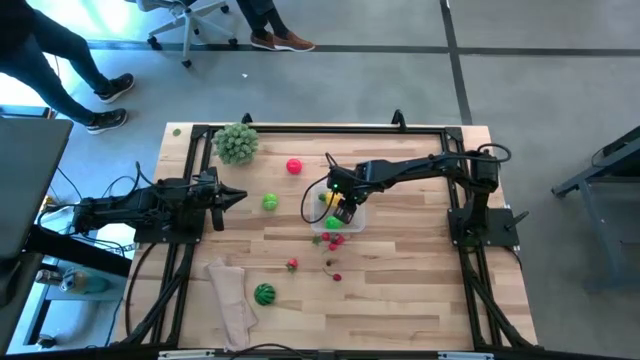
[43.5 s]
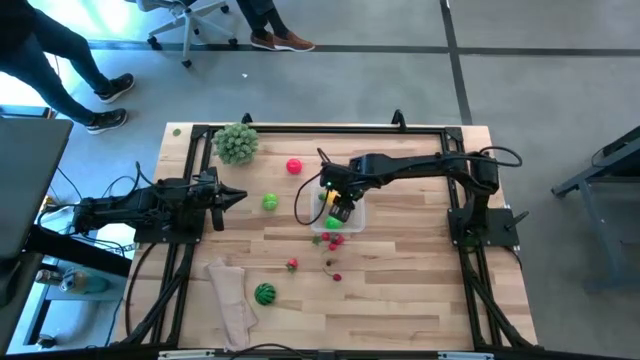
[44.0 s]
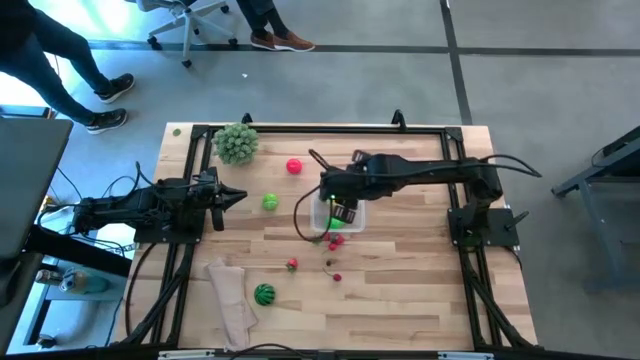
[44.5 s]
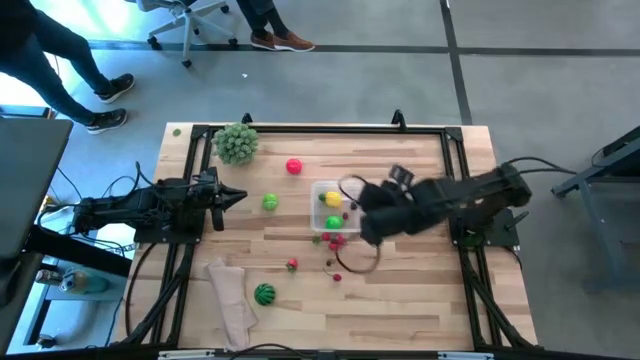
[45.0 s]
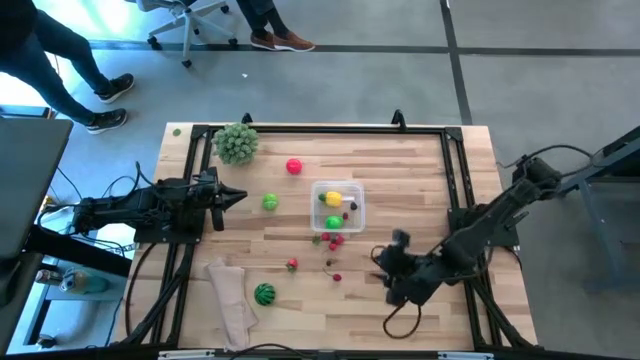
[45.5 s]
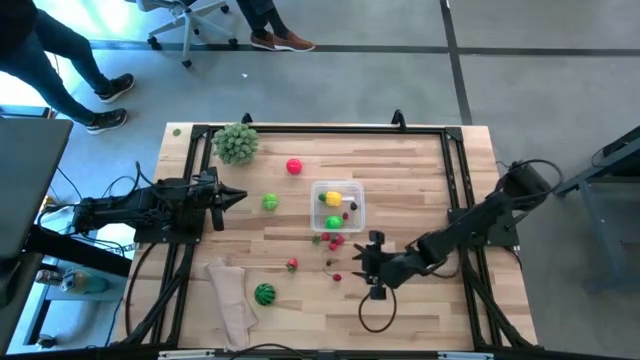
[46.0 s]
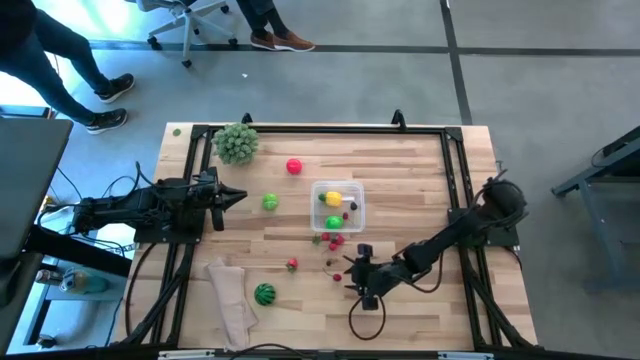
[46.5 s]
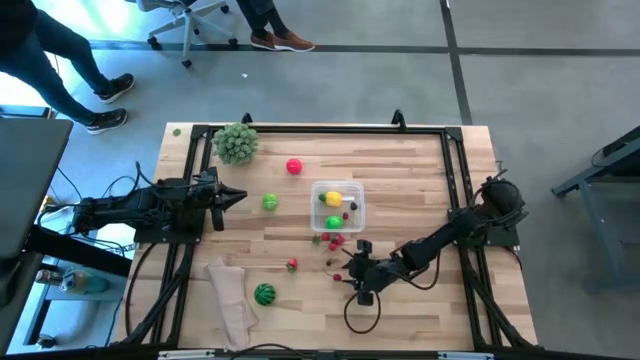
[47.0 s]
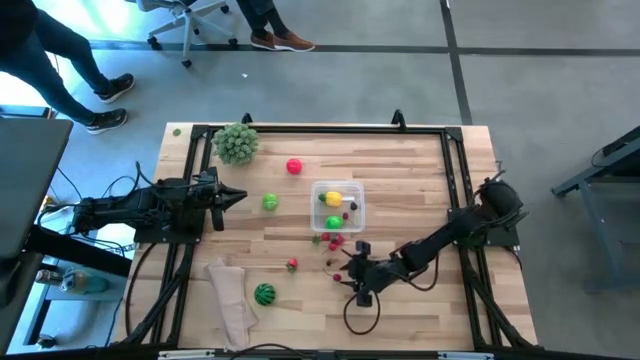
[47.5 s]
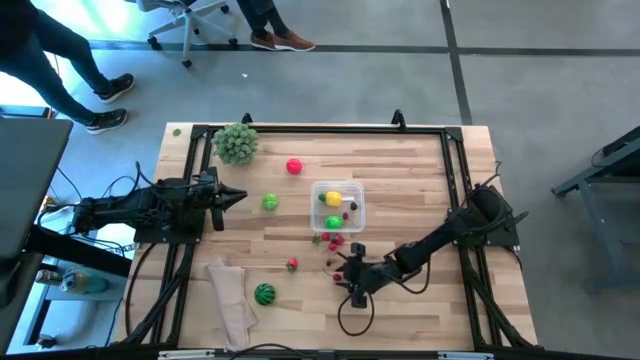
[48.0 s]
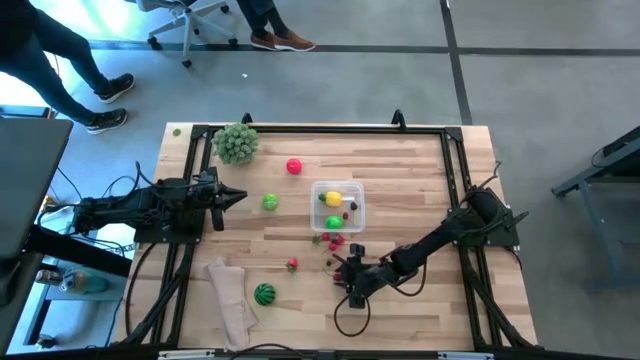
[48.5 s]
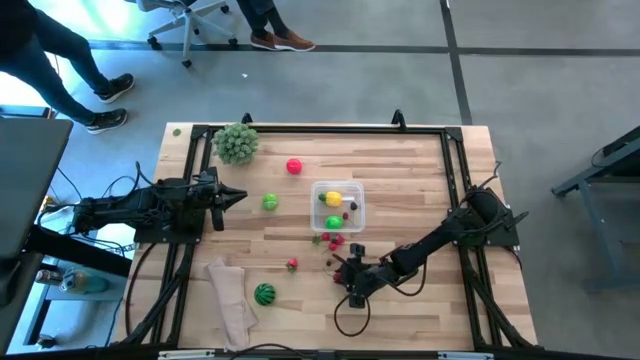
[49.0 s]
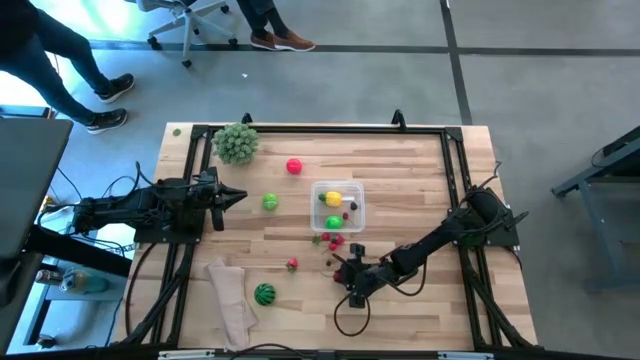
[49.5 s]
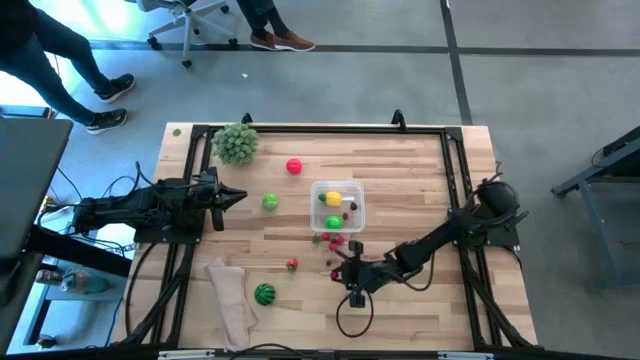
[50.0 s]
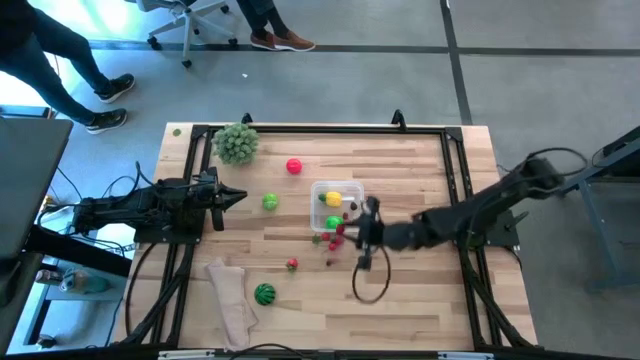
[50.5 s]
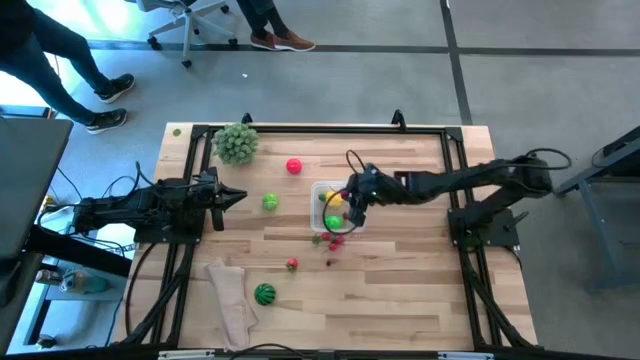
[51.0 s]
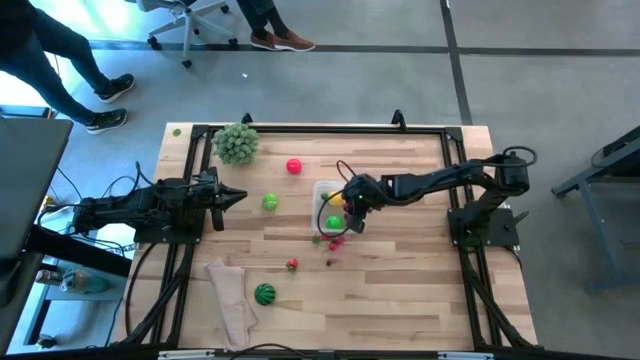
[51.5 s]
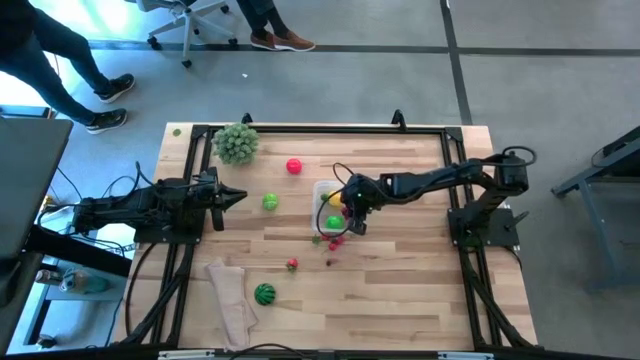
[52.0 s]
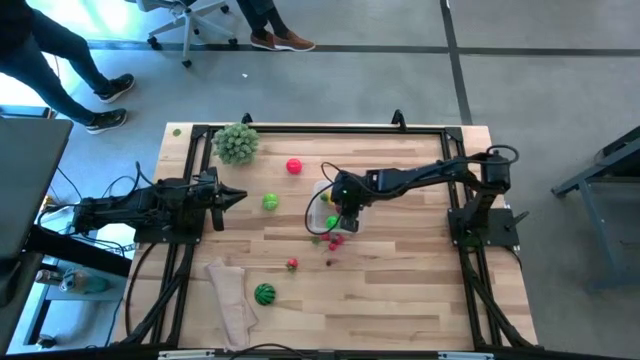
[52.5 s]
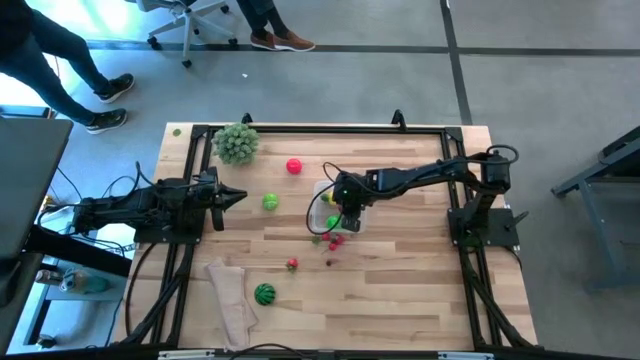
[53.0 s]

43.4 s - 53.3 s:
Task: Pick and placing Produce into tupperware
Put the red cherry into the transparent container

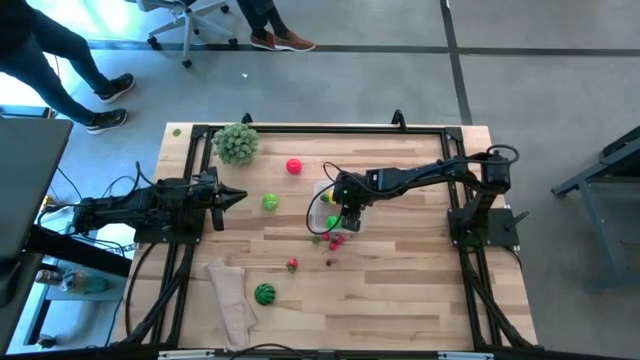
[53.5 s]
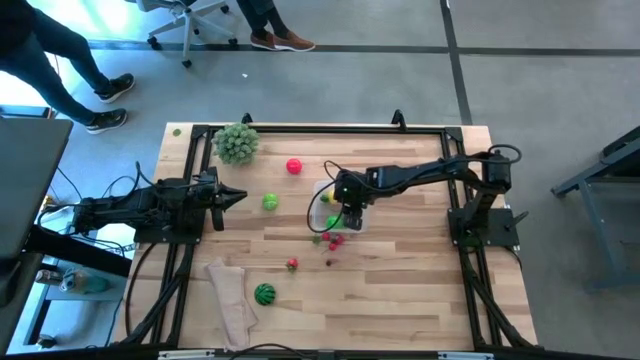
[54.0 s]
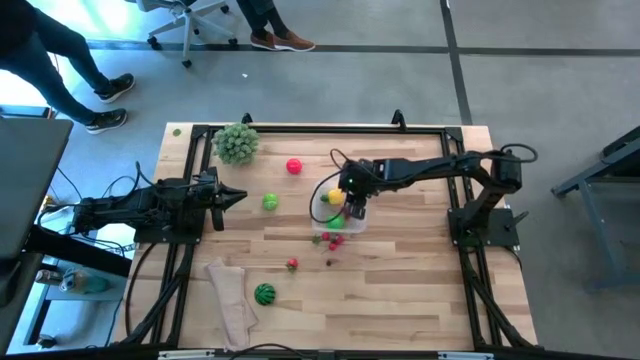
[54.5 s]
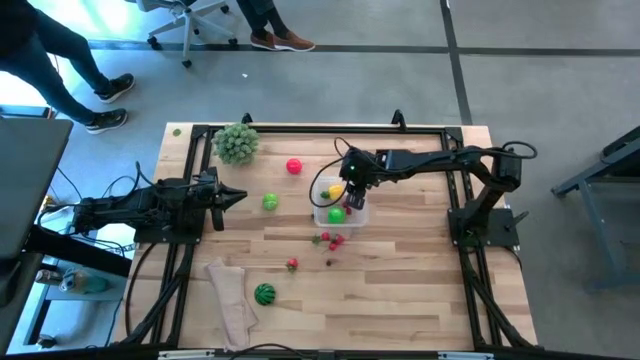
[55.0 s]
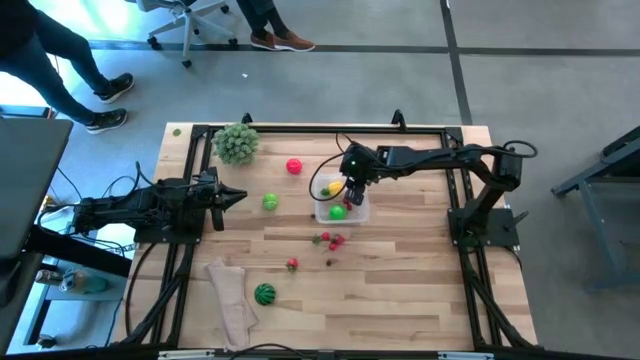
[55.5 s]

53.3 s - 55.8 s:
Adjust the transparent container

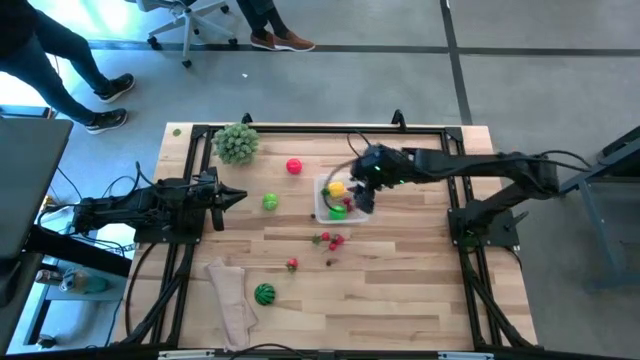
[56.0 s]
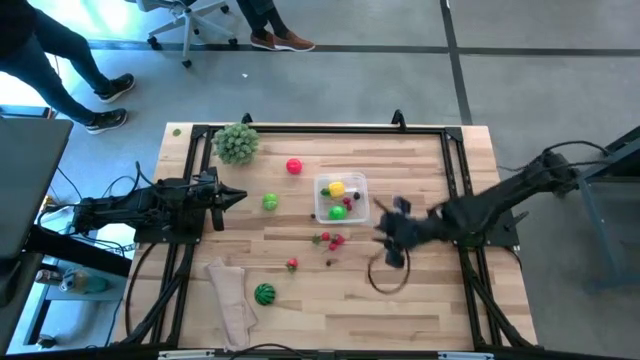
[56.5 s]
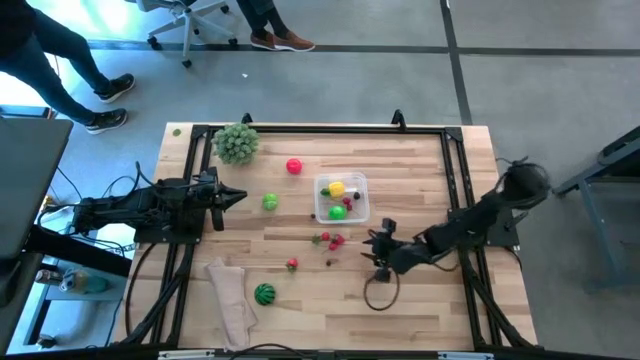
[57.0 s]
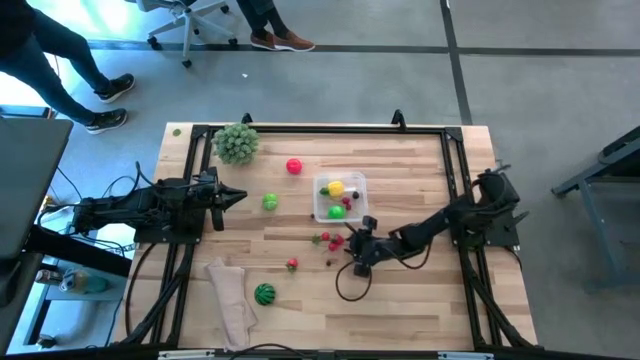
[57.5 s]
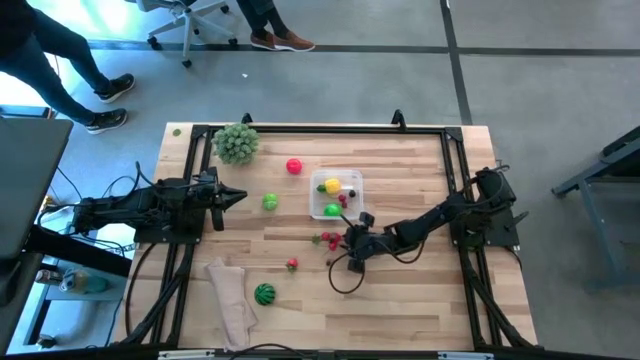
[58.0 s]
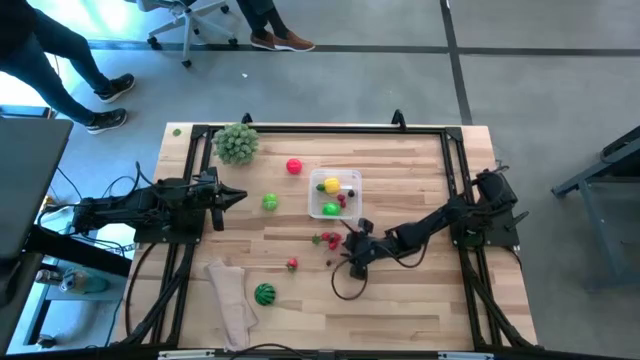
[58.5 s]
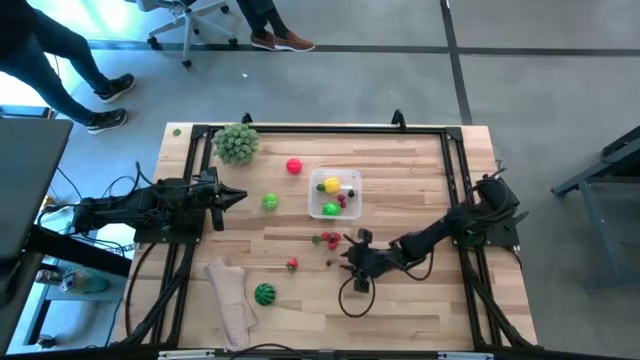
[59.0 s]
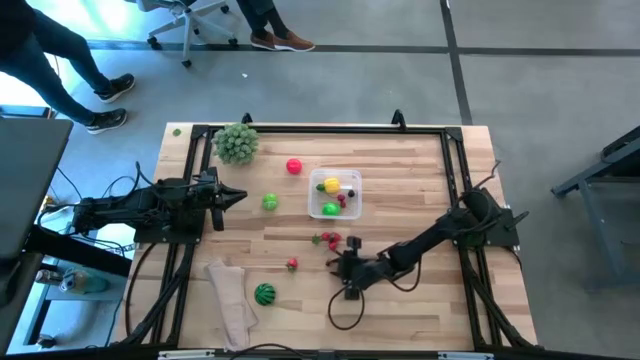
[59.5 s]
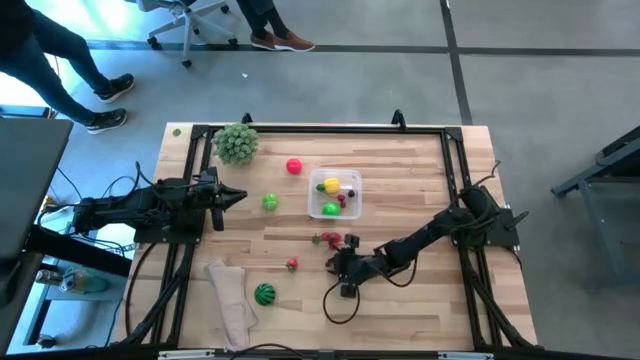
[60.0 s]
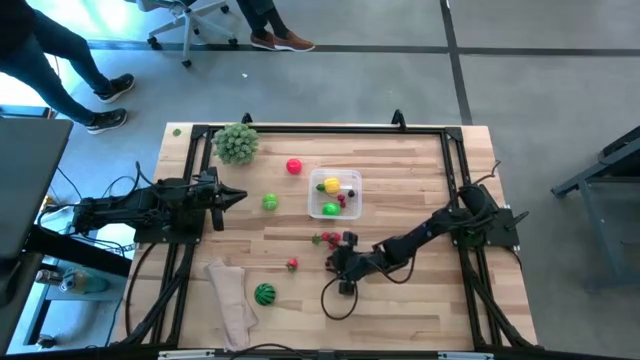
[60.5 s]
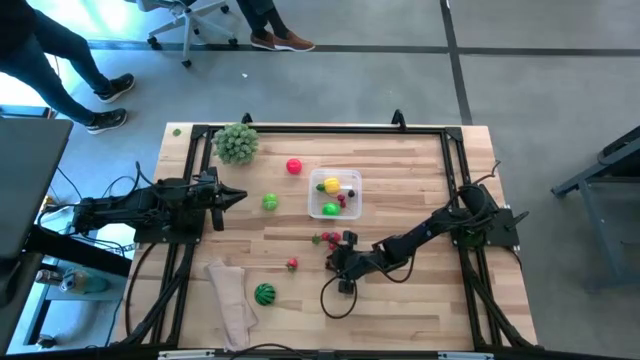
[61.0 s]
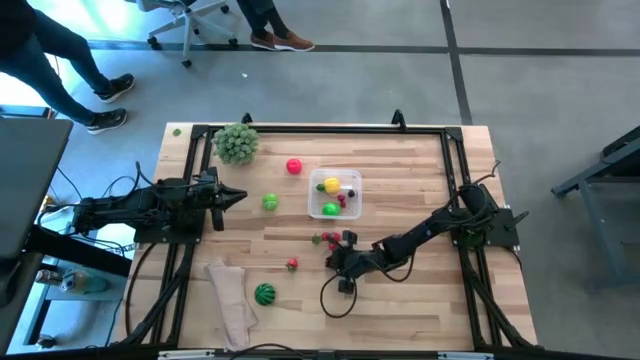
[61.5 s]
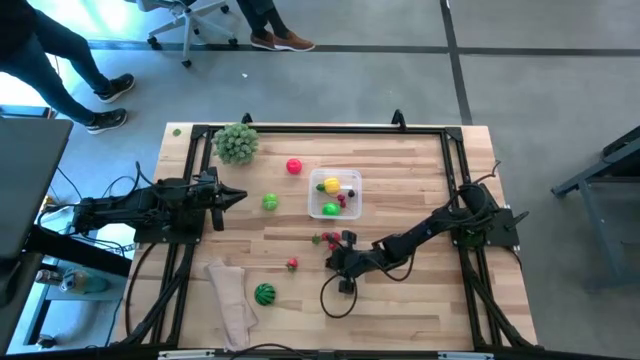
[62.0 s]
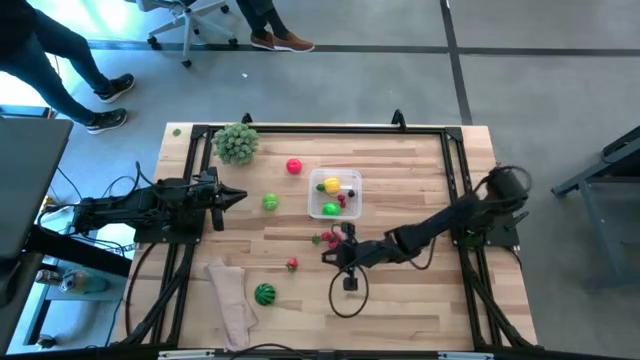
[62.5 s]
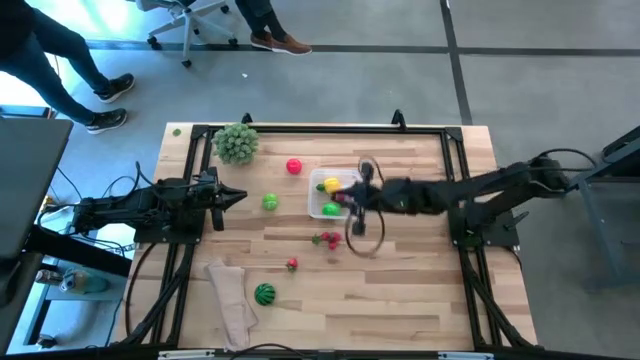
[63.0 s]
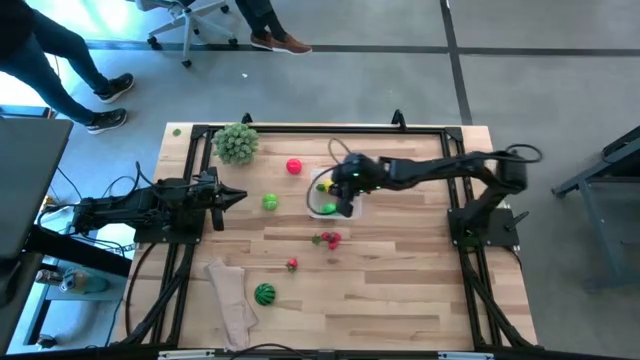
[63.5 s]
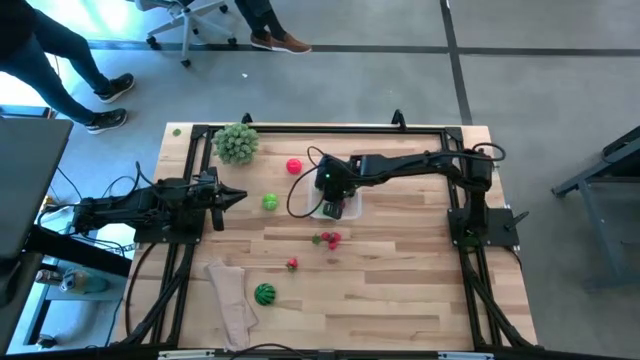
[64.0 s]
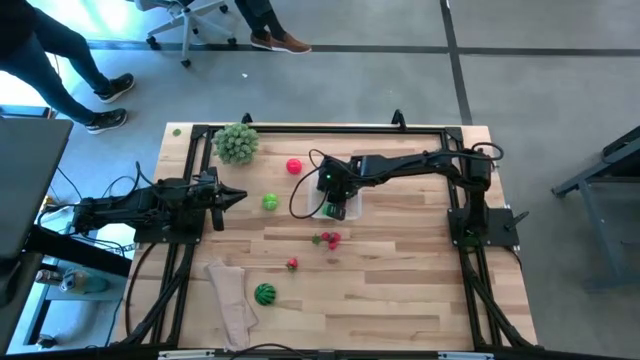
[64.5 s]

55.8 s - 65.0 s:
Put the blueberry into the transparent container

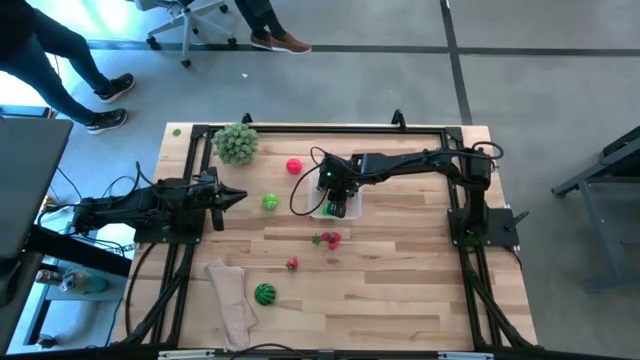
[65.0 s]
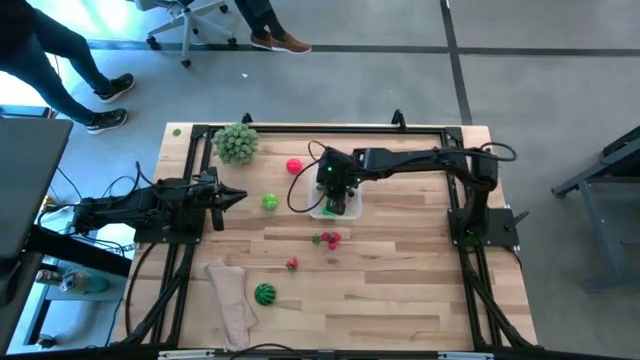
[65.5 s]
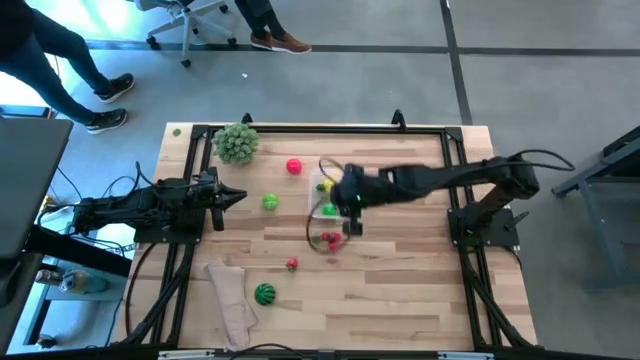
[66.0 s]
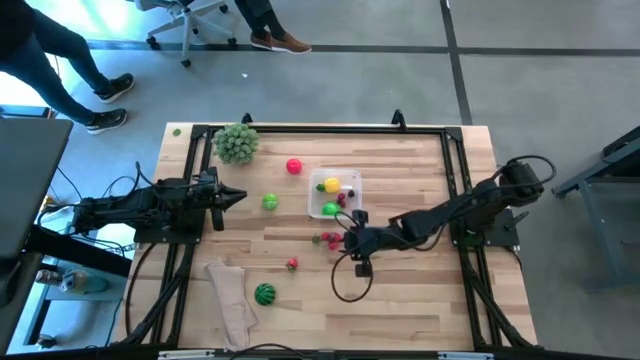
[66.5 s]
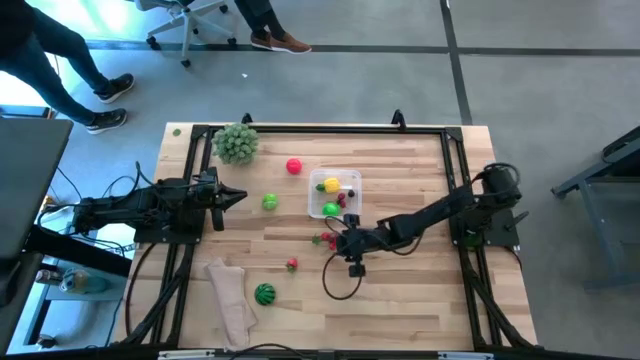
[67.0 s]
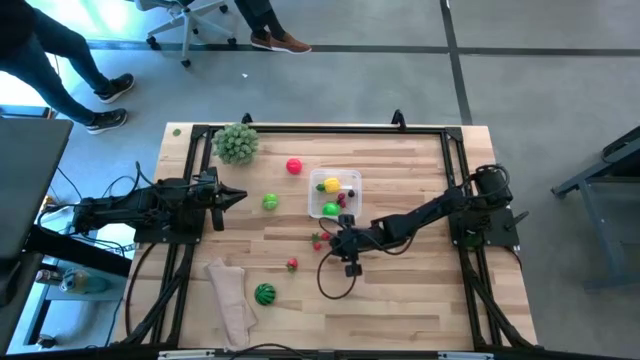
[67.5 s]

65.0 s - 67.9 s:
Put the red cherry into the transparent container
